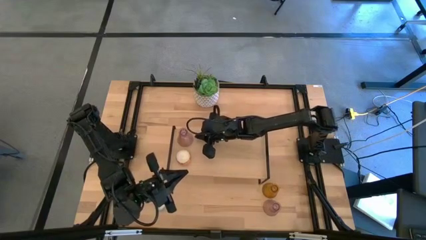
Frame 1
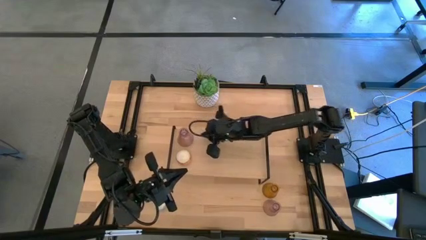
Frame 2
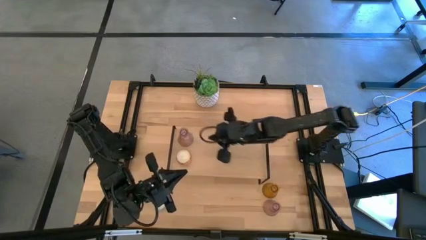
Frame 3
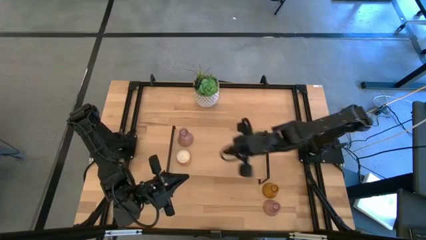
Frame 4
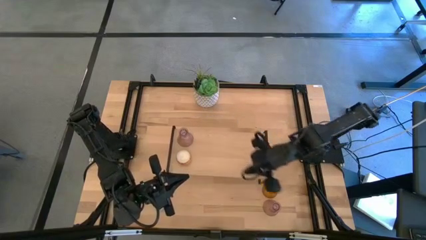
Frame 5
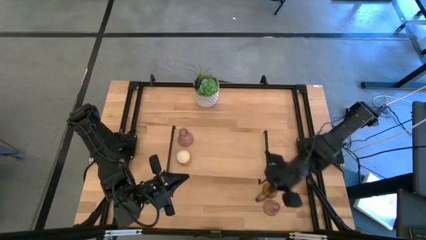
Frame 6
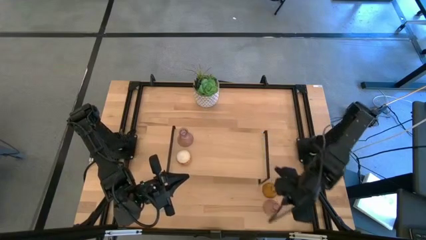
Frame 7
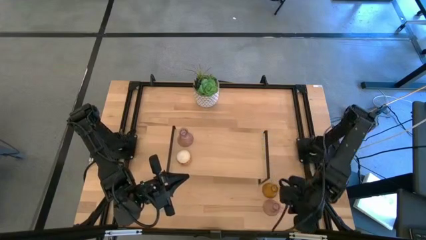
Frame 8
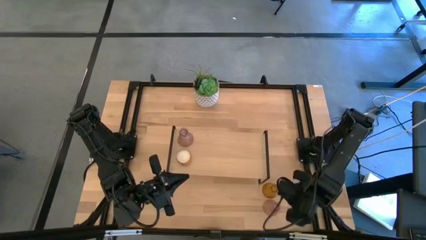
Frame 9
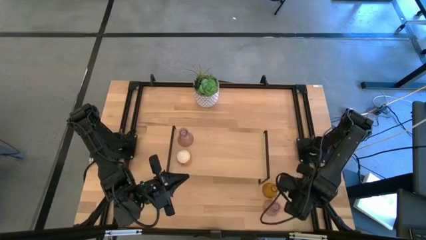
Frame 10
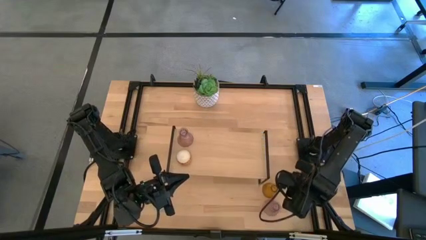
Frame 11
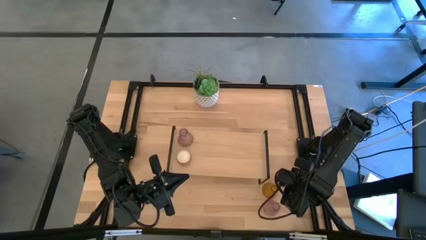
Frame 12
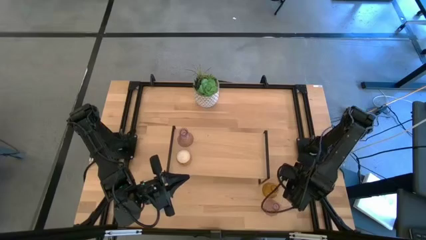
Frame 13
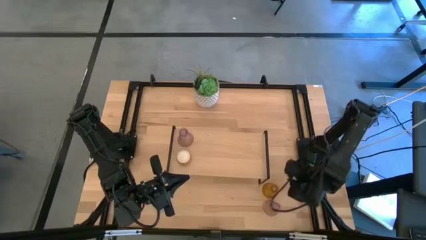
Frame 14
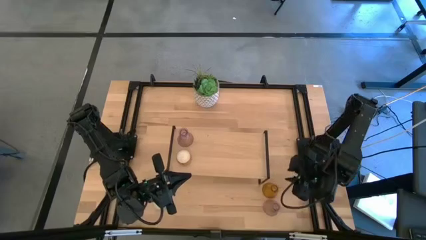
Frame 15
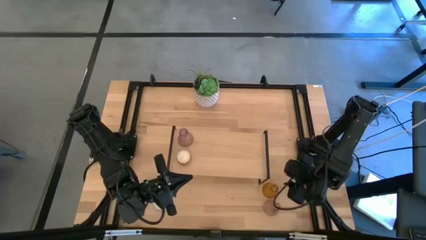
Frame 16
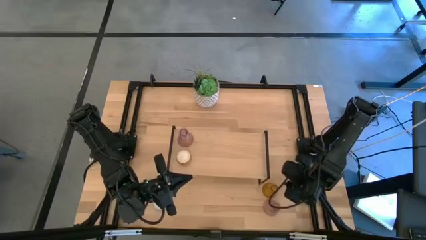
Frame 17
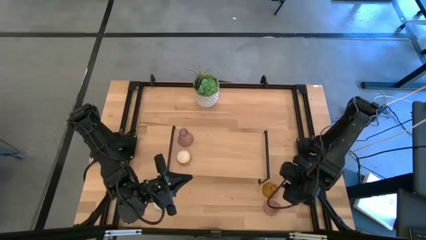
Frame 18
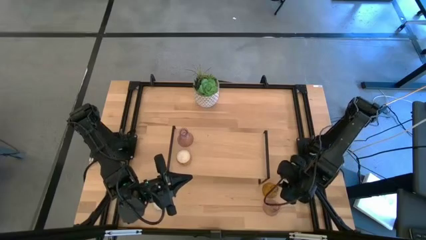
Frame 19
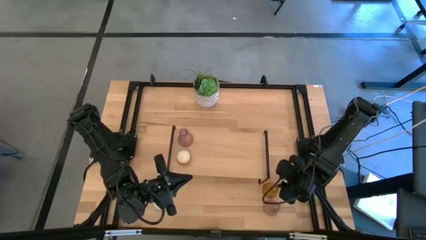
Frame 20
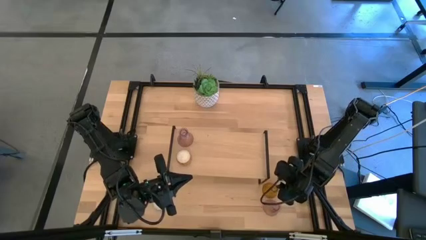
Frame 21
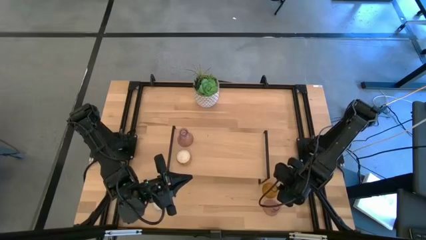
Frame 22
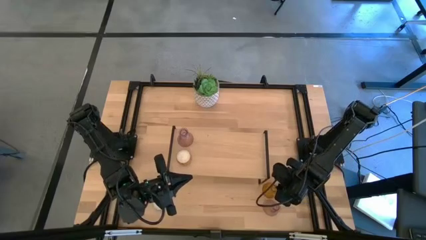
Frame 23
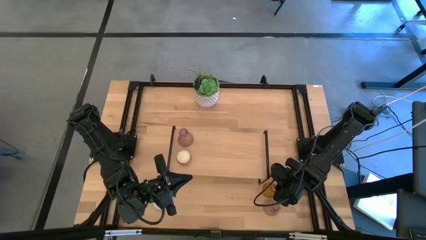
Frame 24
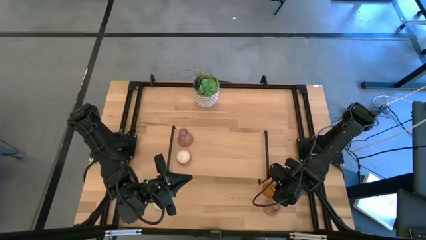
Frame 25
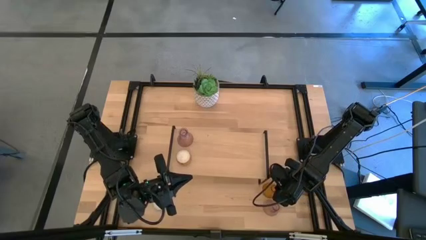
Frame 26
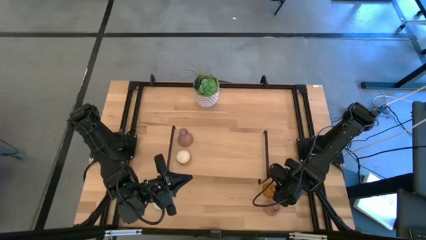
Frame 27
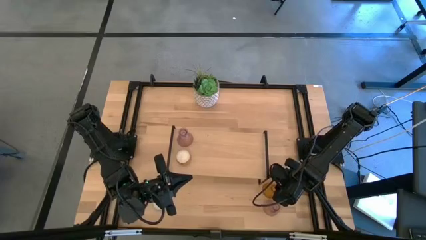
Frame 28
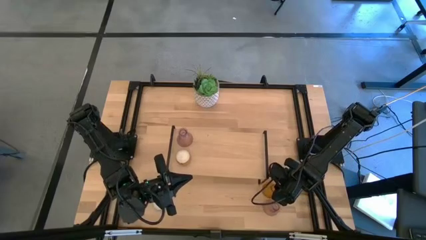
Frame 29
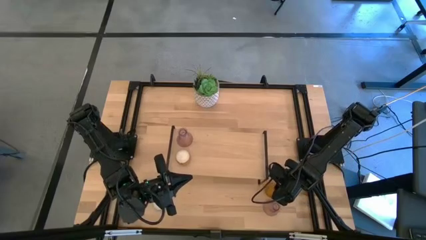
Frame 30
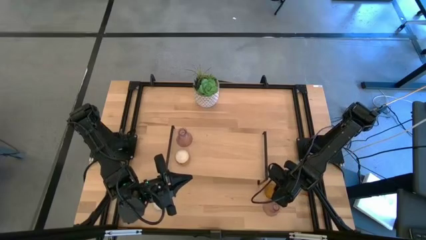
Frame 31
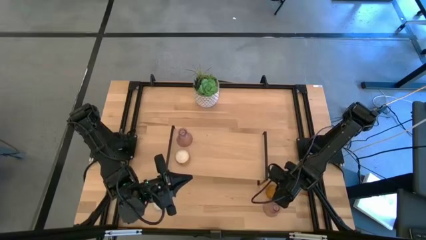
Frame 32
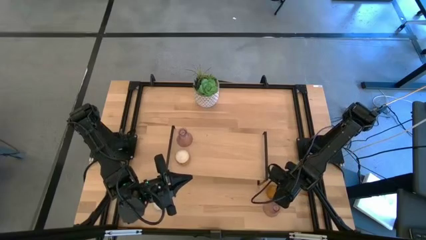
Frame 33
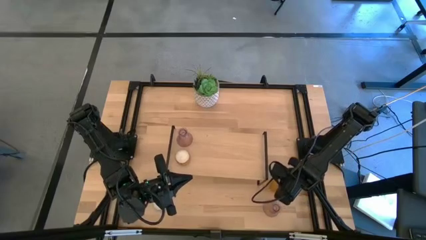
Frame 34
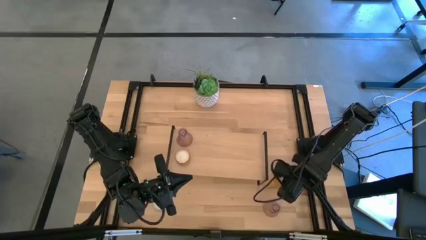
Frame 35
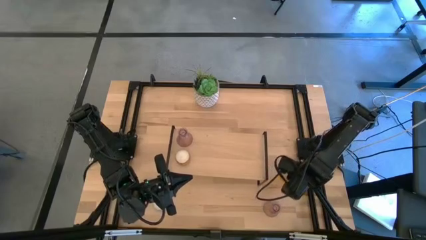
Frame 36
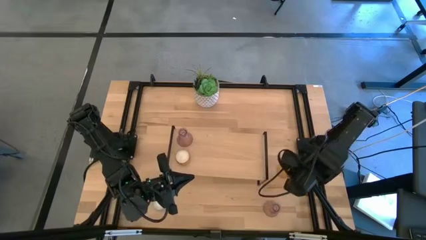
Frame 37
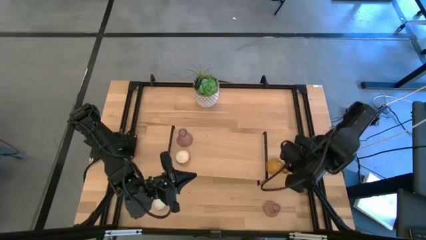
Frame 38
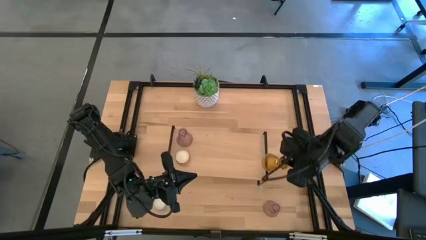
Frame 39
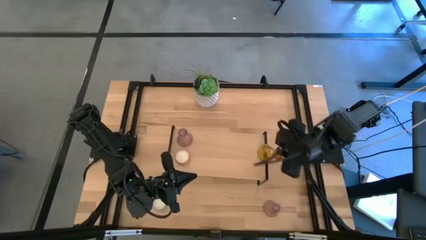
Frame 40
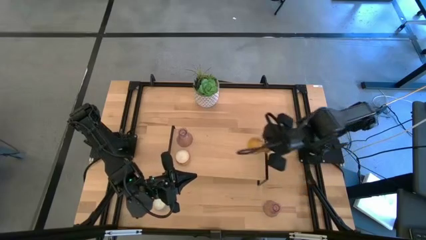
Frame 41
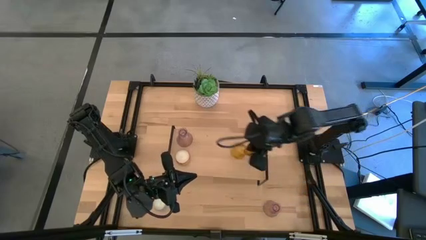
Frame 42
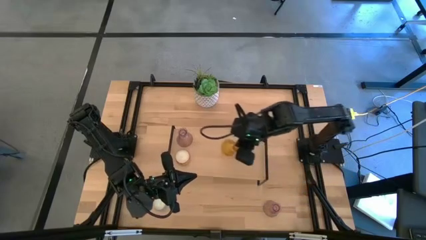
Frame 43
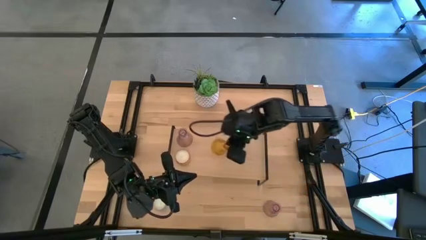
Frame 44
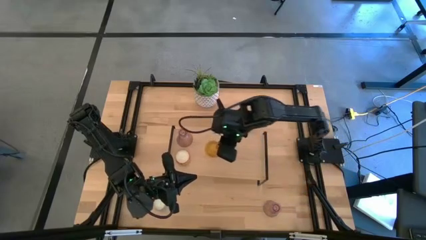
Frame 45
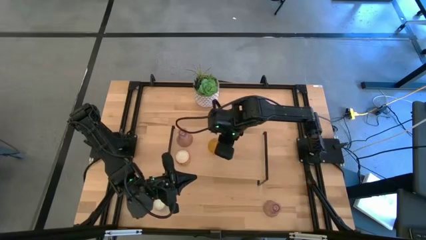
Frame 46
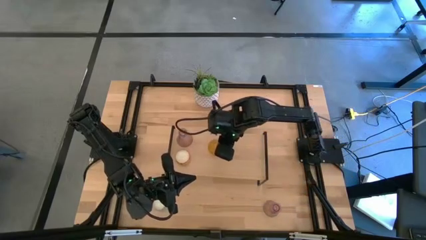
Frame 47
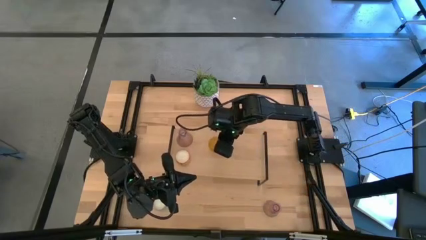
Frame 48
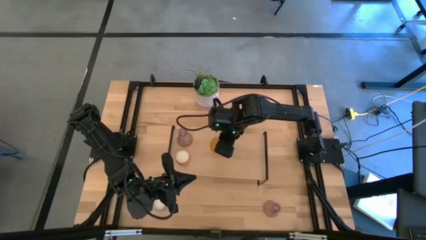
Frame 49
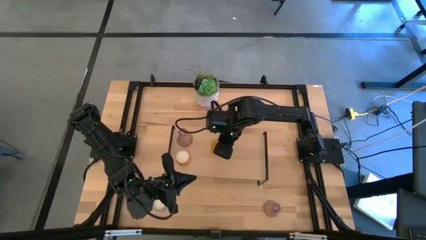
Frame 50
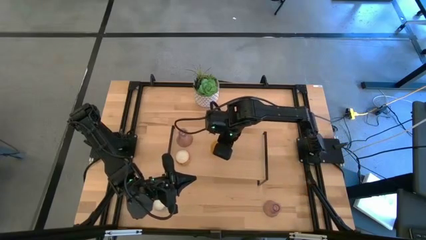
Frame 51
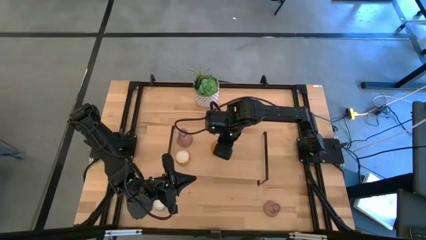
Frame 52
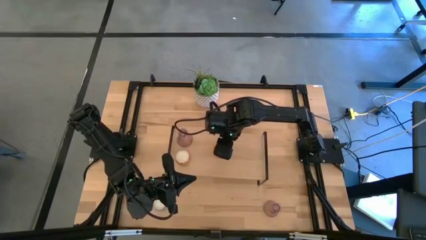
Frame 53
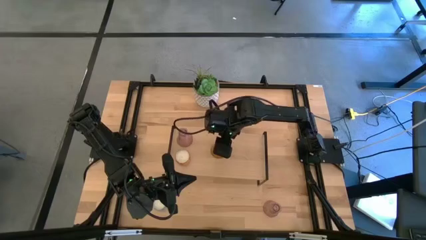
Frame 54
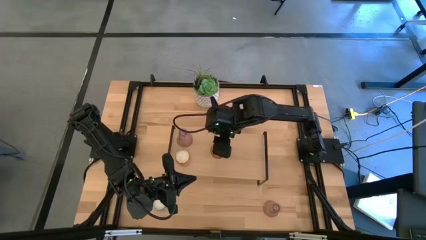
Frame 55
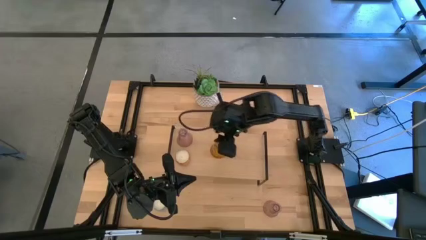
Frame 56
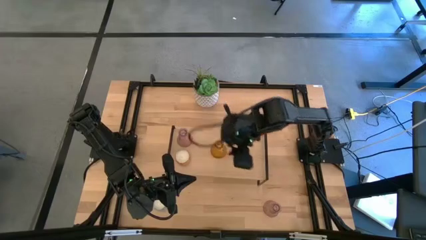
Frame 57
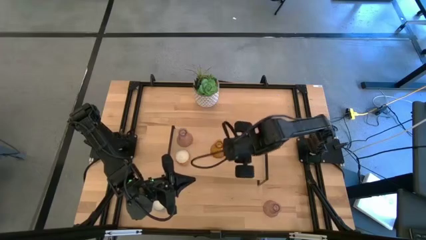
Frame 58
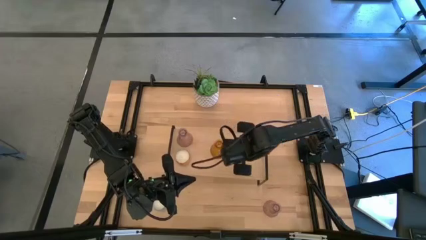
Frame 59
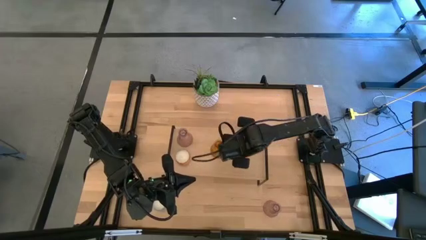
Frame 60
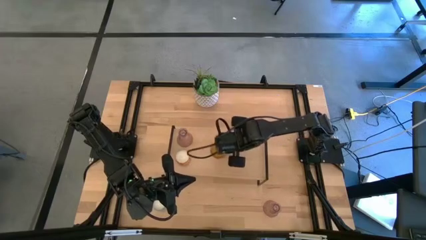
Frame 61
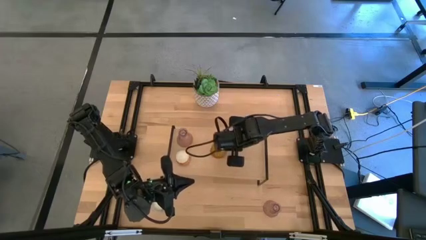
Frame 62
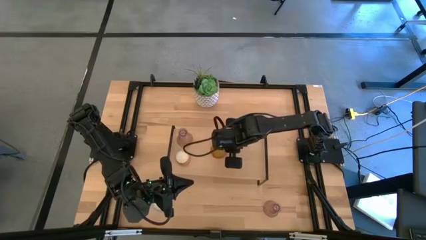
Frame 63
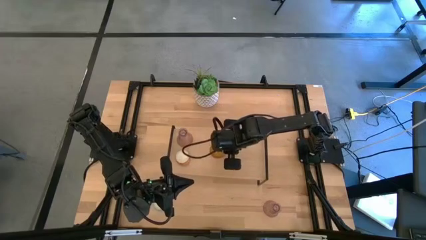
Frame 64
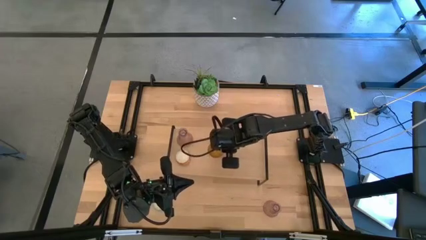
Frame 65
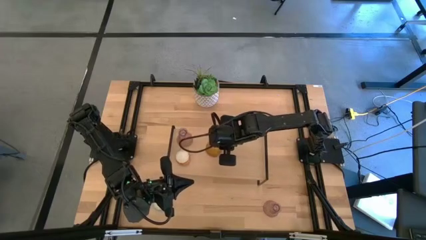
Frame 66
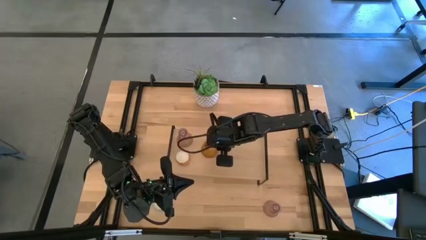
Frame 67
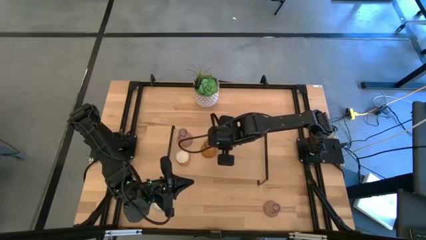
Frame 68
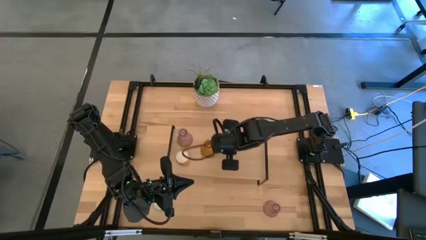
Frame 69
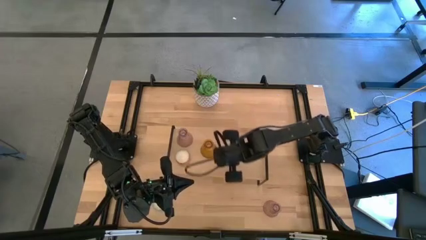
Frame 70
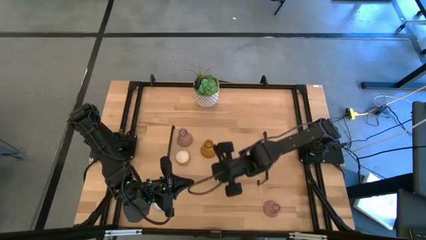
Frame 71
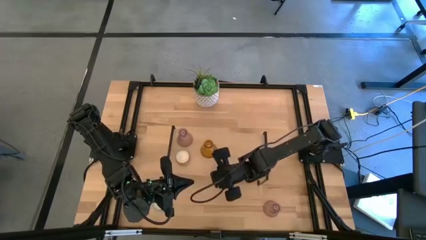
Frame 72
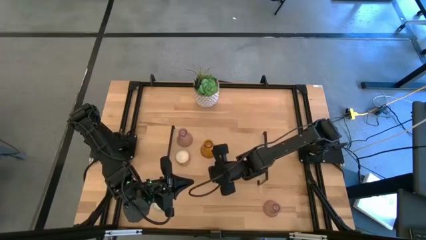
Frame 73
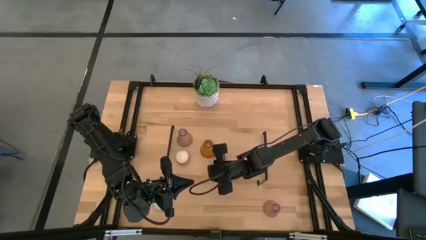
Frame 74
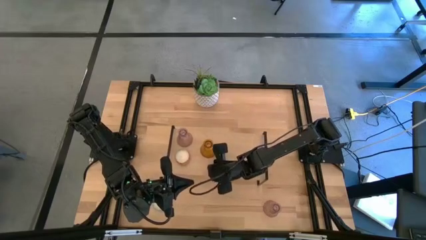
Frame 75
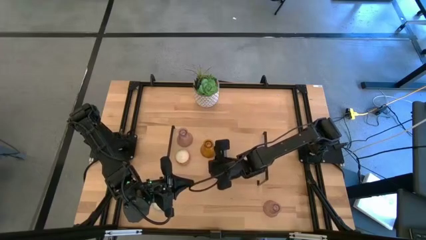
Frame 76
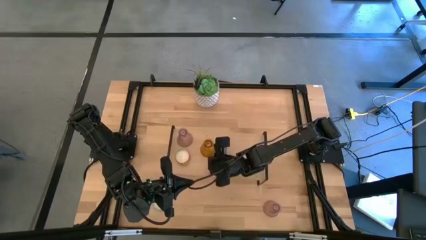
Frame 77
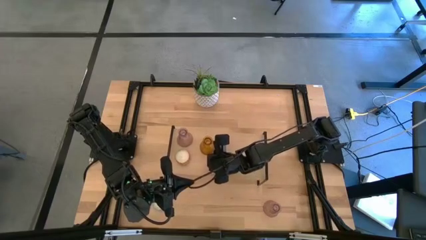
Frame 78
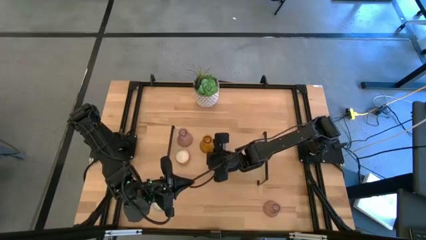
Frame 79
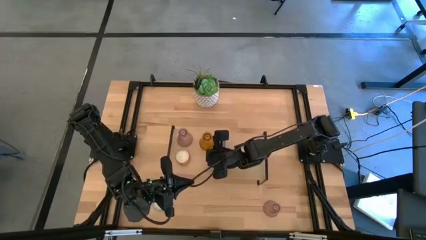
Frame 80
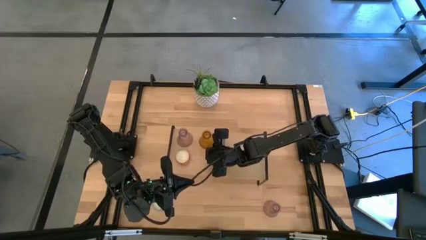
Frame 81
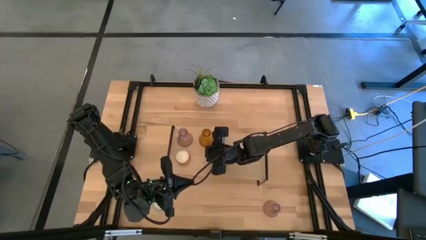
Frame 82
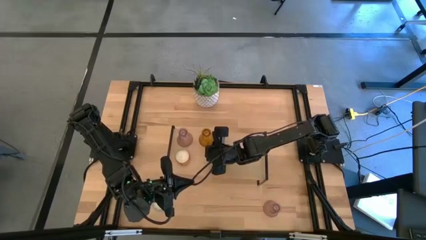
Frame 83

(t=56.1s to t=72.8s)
Task: Pick & Place candle stick holders
Put the yellow glass candle holder on the shelf
